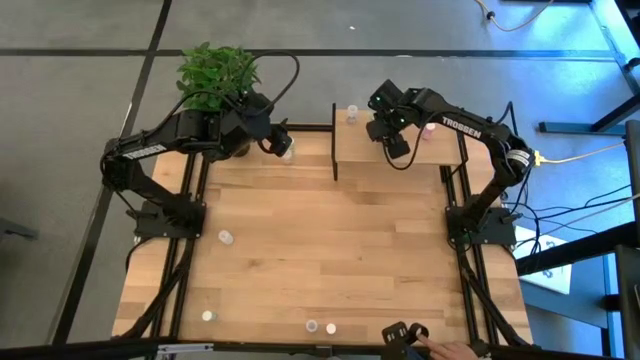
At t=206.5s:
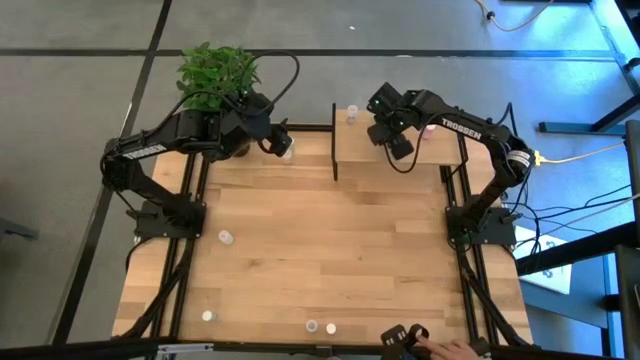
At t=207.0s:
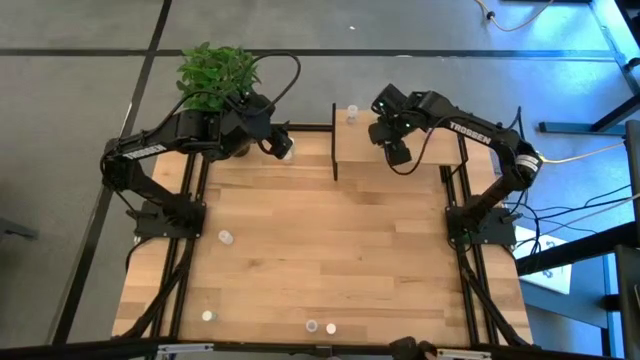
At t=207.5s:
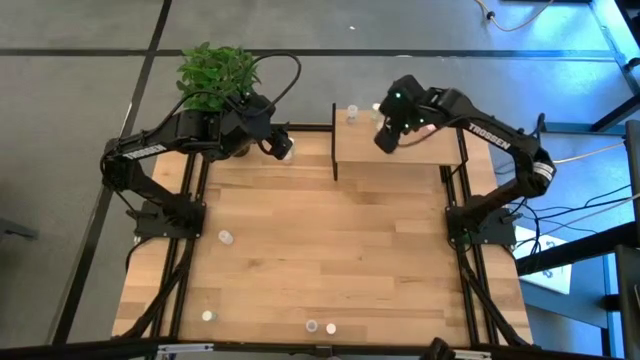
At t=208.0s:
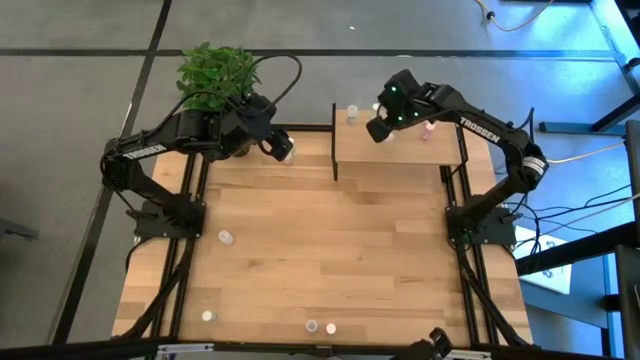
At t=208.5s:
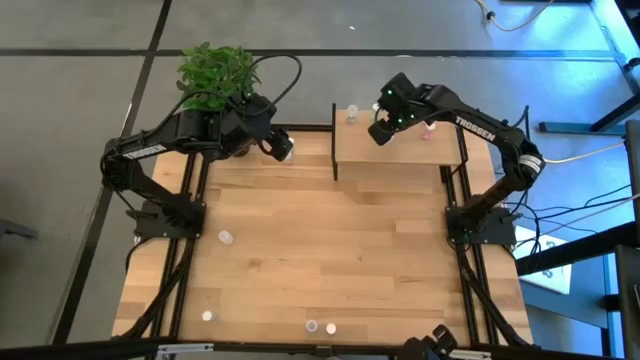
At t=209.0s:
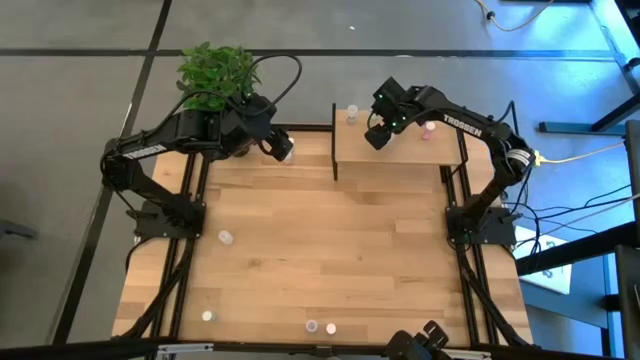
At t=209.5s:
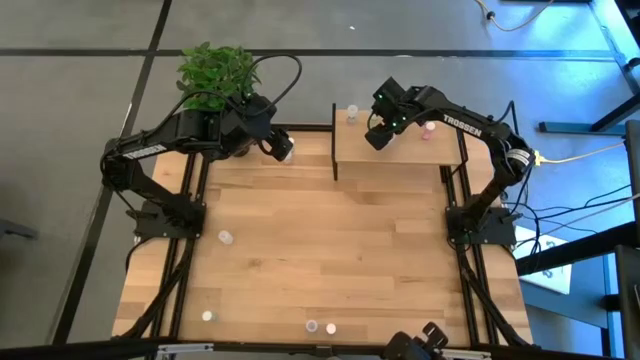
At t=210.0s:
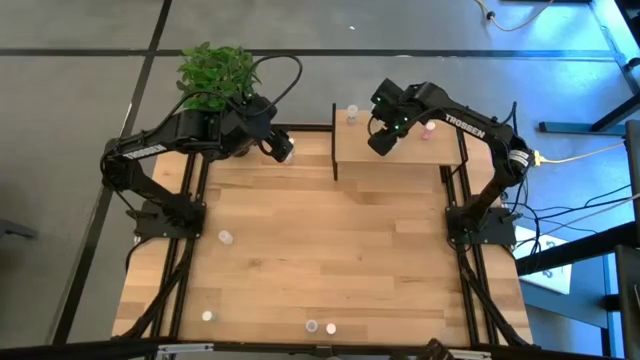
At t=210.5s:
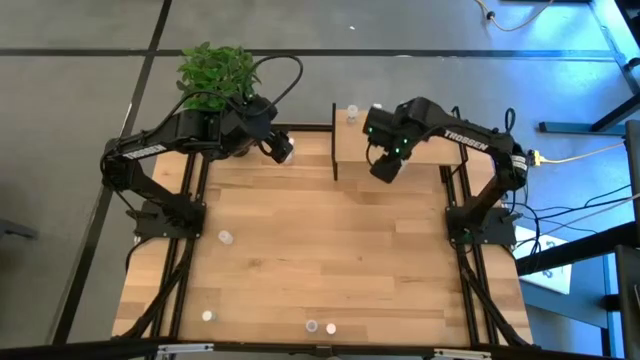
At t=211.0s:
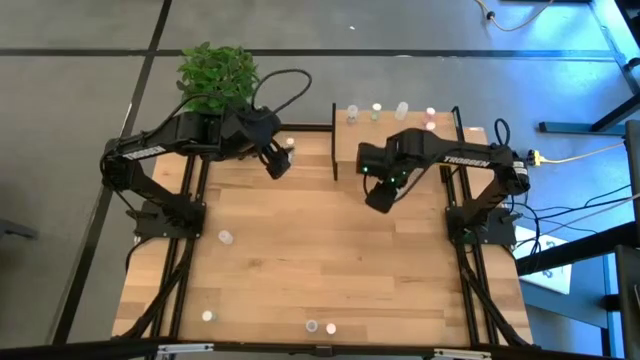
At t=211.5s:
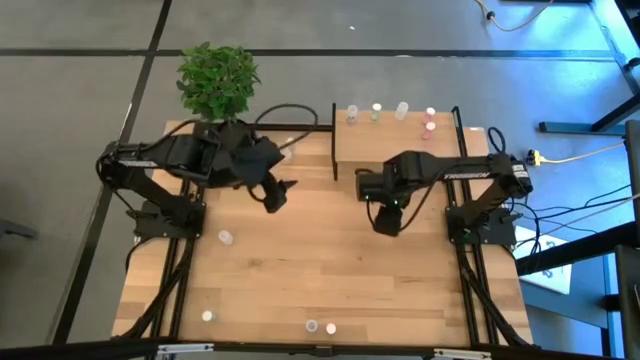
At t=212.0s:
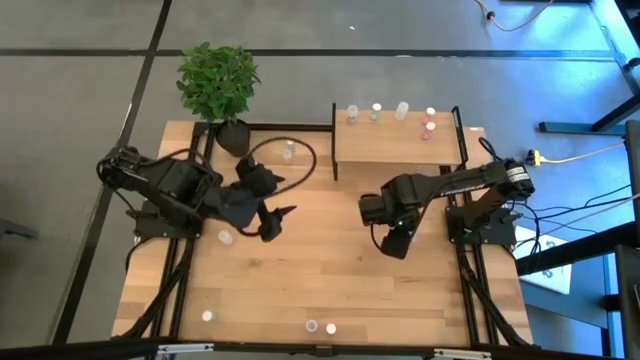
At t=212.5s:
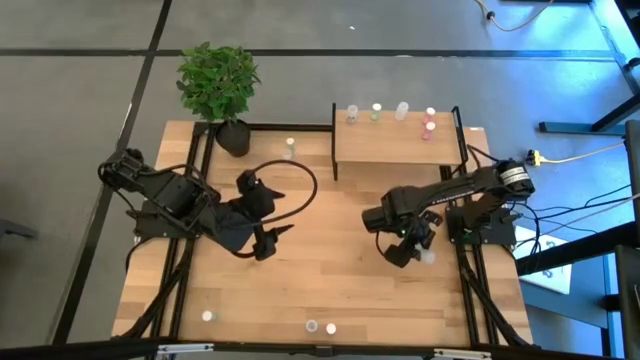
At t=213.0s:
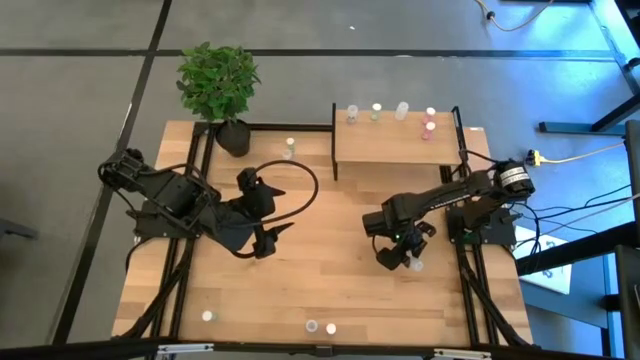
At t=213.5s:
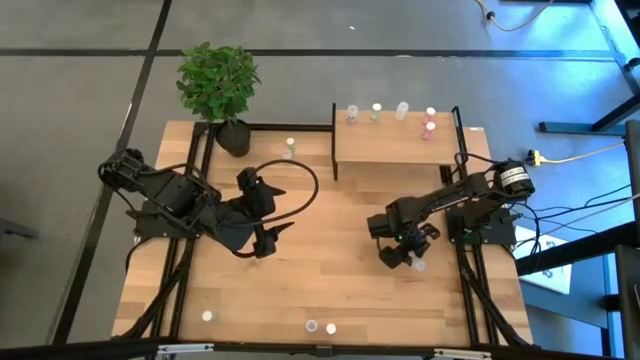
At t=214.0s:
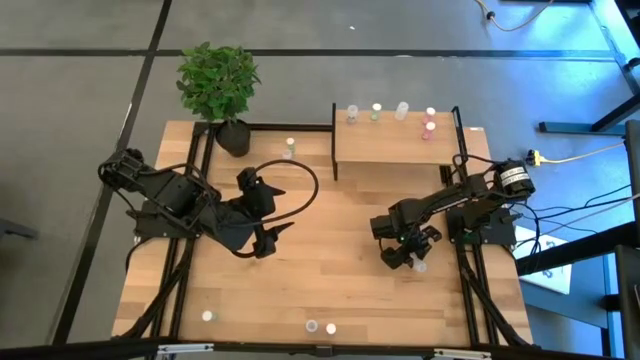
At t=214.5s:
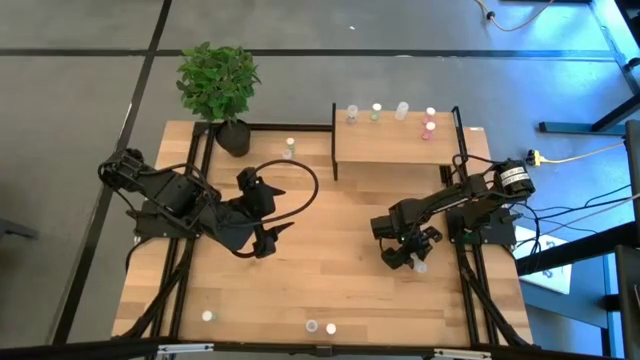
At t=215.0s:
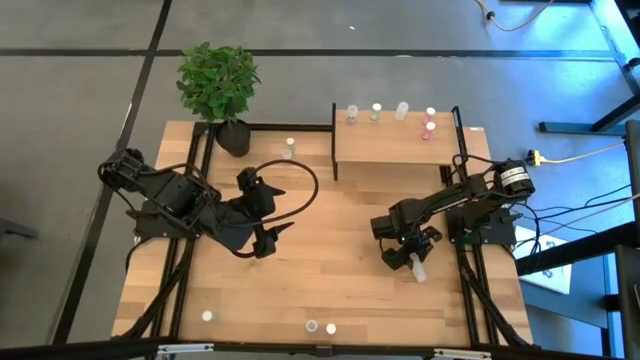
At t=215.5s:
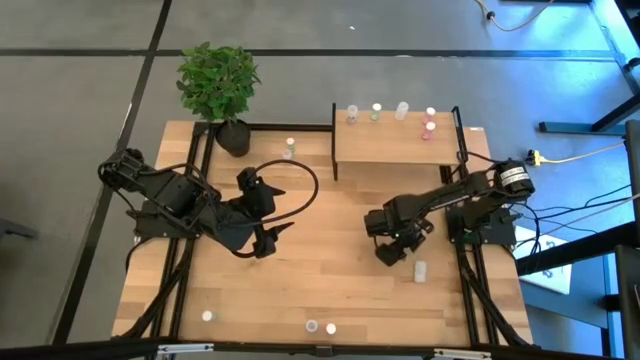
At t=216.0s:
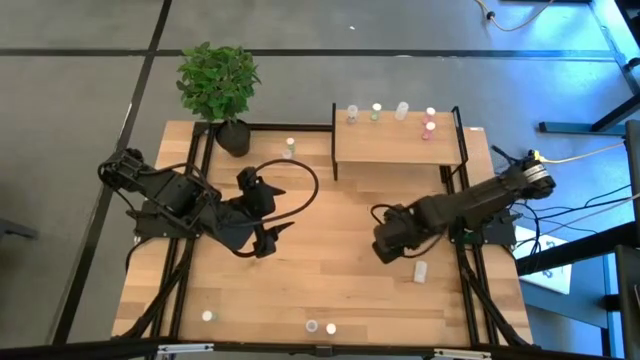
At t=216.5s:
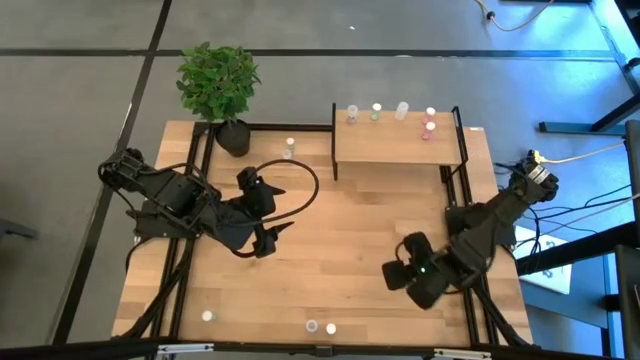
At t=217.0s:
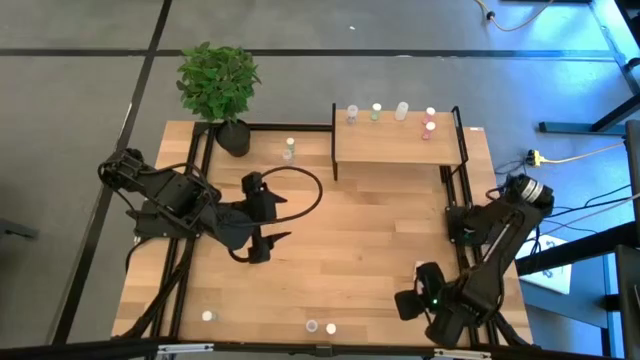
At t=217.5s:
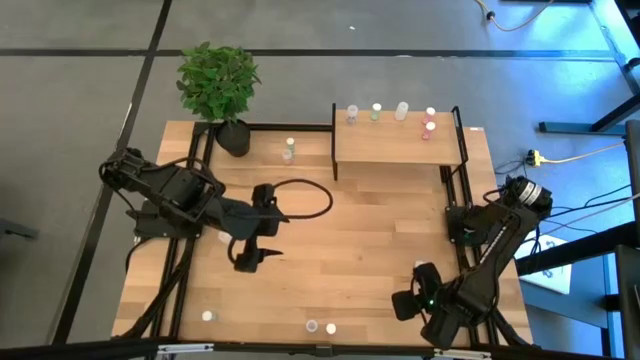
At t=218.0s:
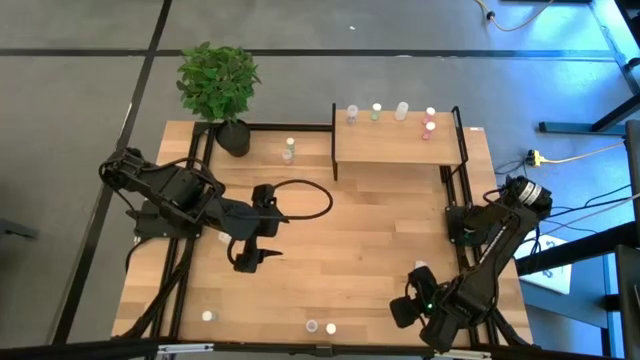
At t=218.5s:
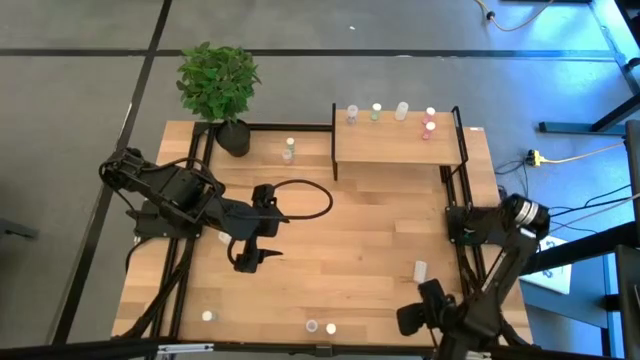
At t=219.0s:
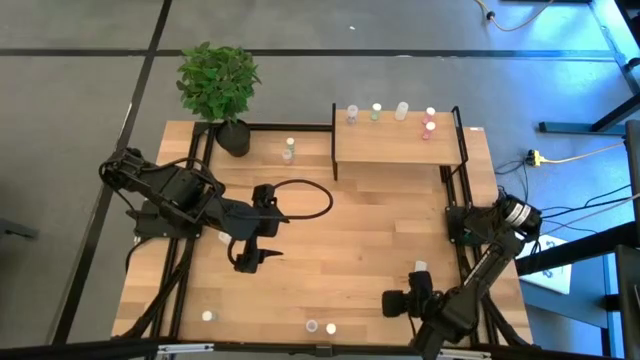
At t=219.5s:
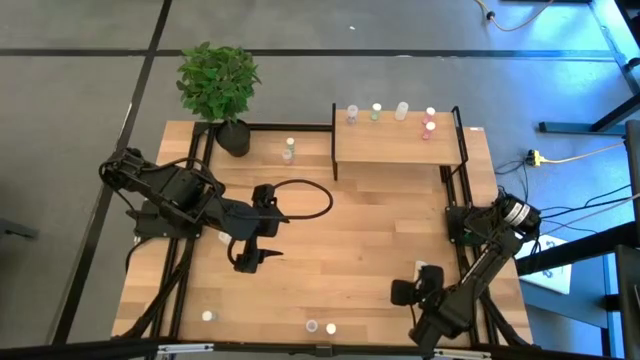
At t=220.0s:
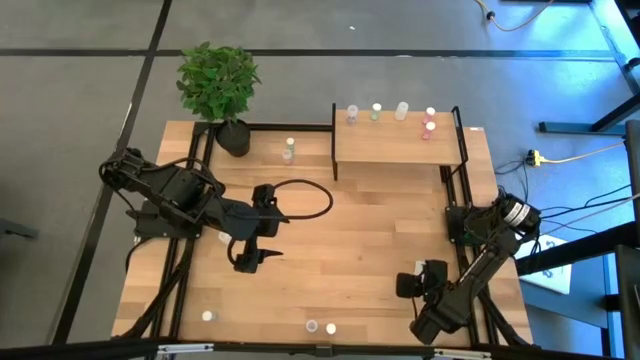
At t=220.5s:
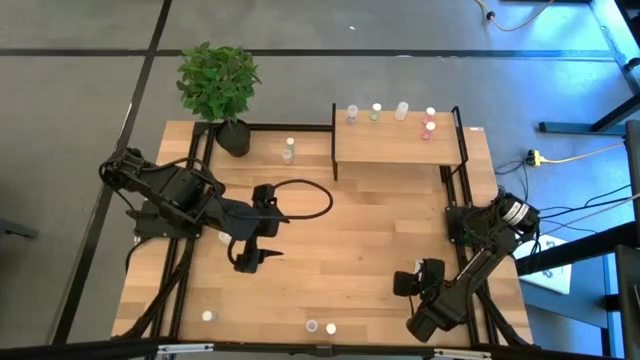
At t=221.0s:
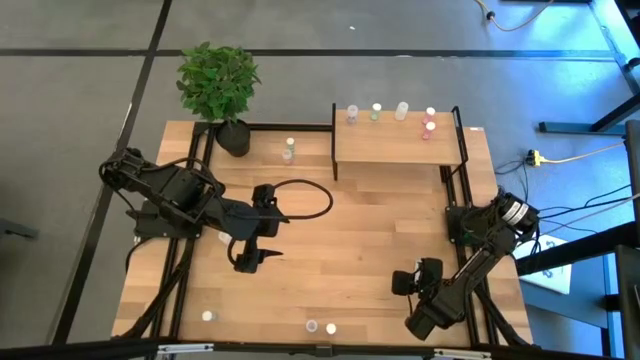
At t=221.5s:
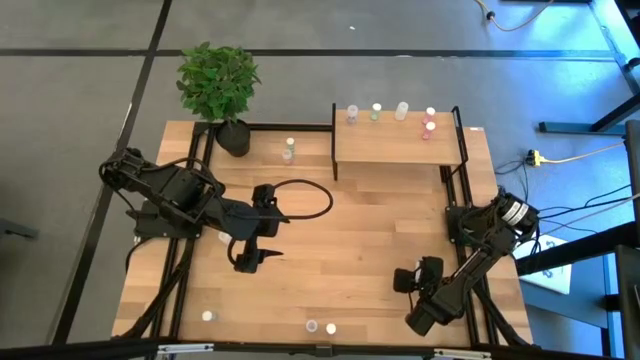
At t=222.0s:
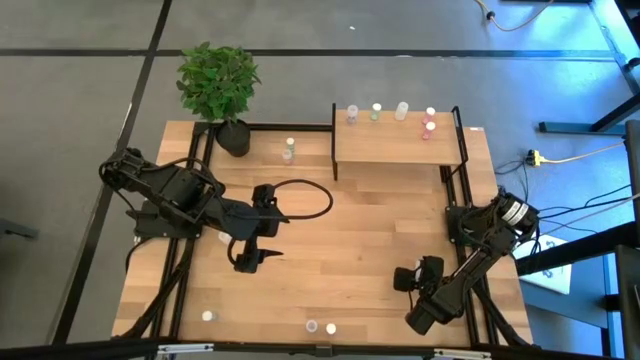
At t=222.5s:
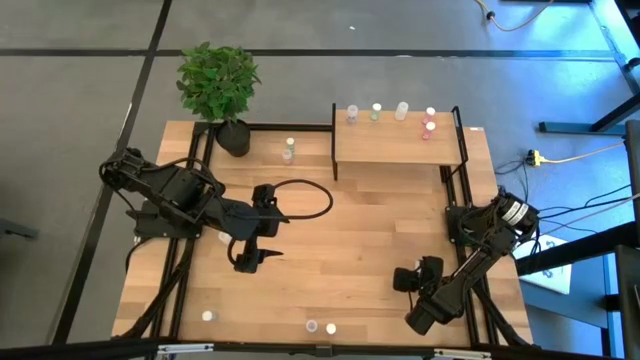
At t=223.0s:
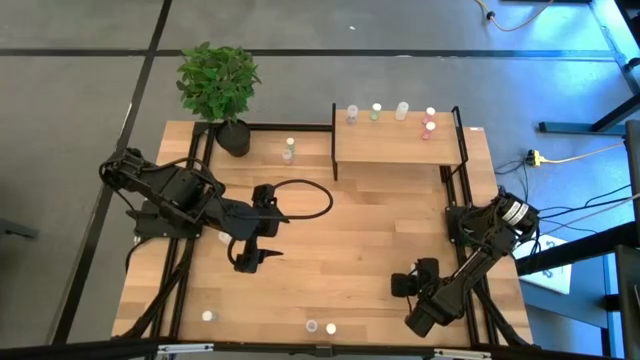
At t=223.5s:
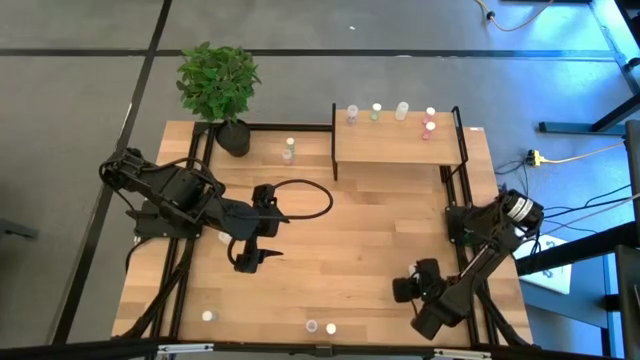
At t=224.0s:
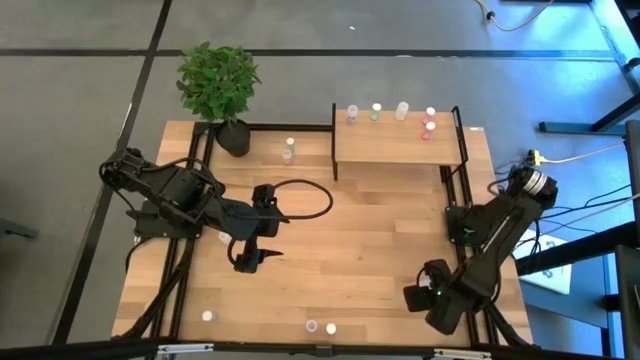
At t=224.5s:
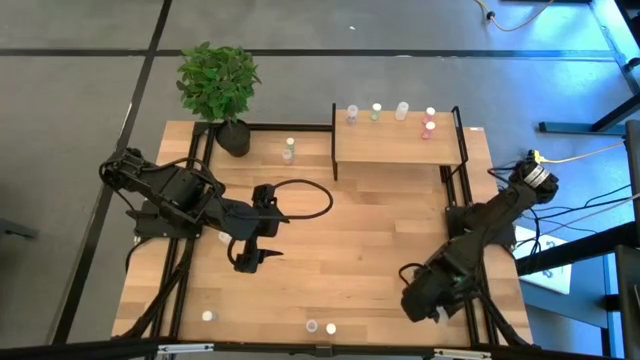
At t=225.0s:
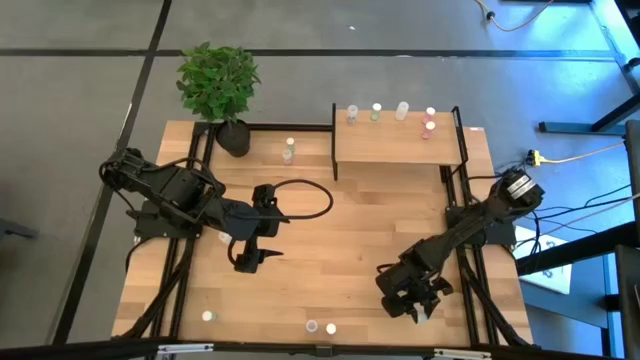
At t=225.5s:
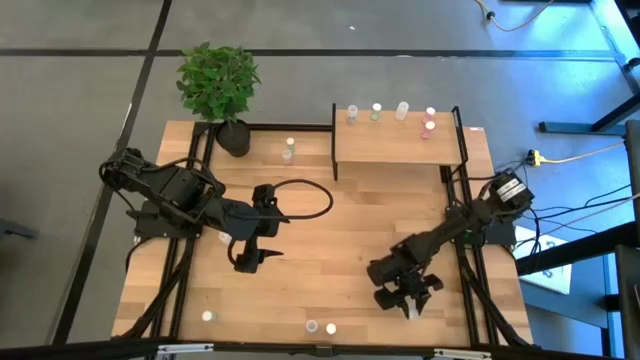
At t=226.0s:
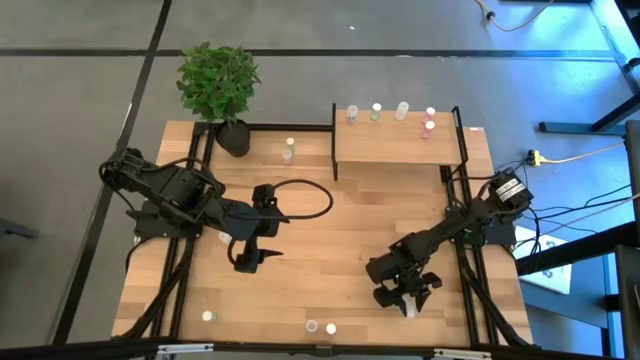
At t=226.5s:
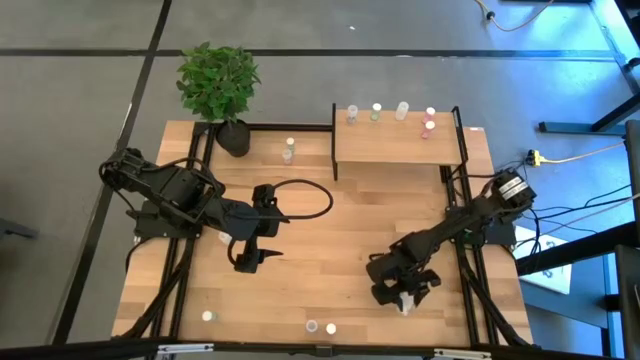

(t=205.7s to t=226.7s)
Task: Pick and place medicine bottles onto shelf by color
Put the bottom white pill bottle aligned with the other white pill bottle on the shelf
